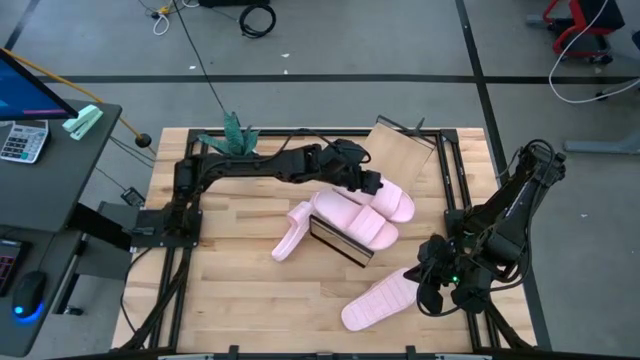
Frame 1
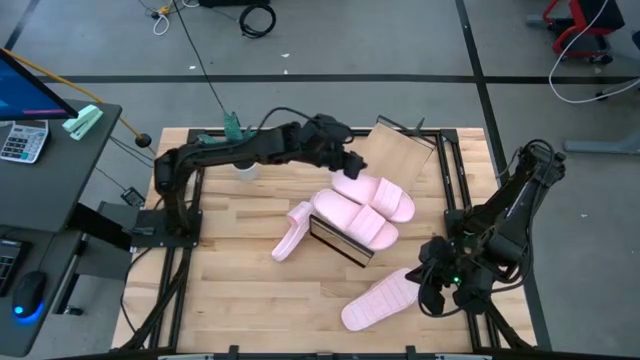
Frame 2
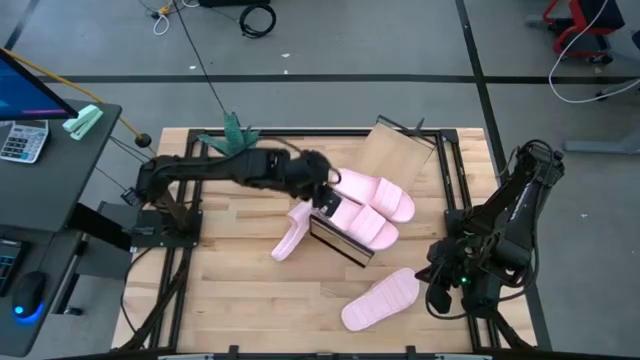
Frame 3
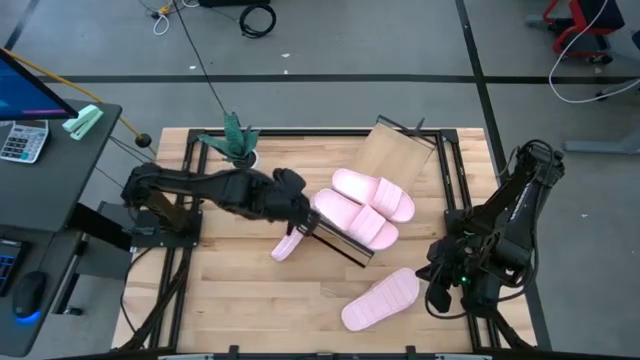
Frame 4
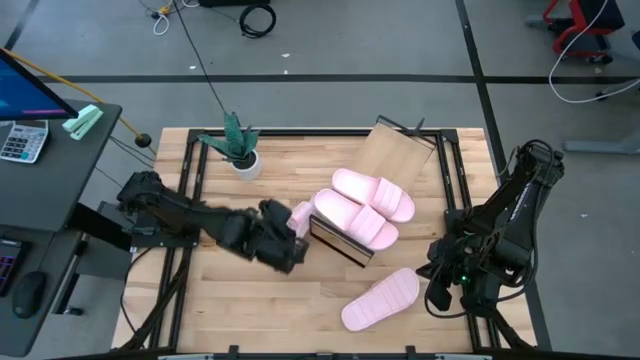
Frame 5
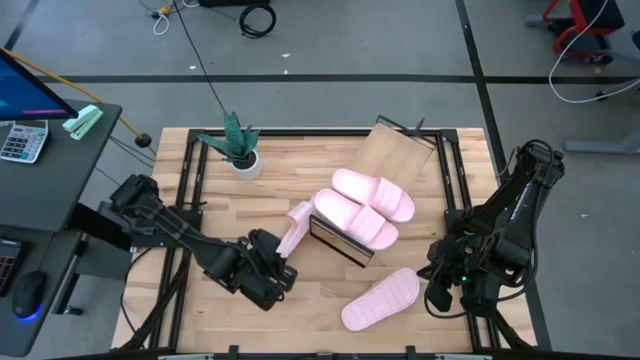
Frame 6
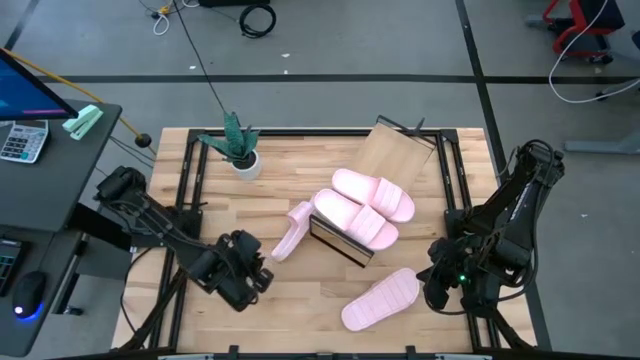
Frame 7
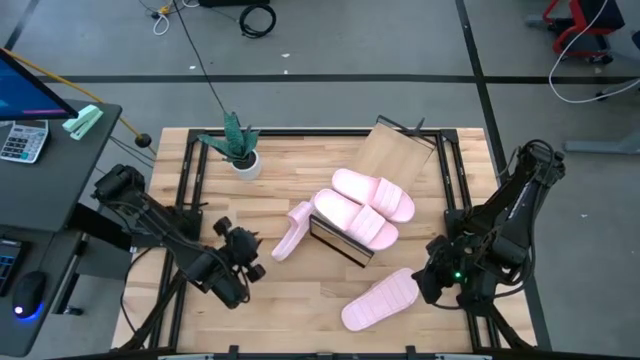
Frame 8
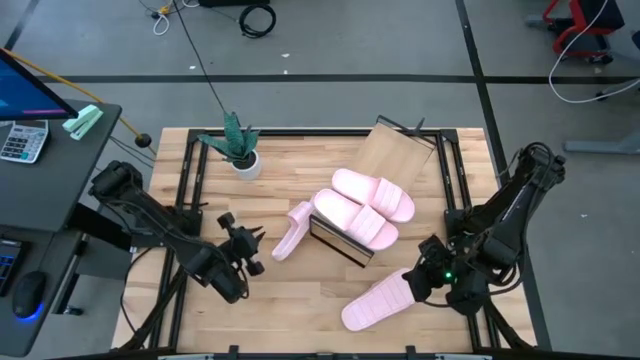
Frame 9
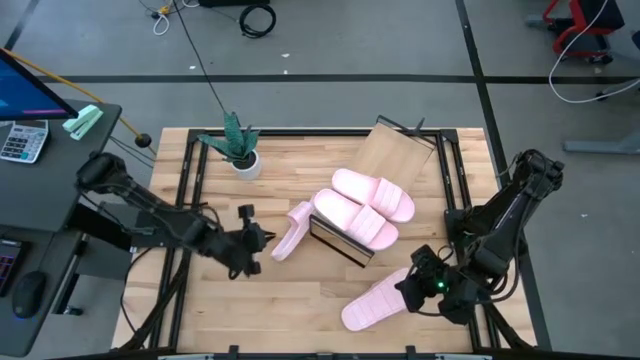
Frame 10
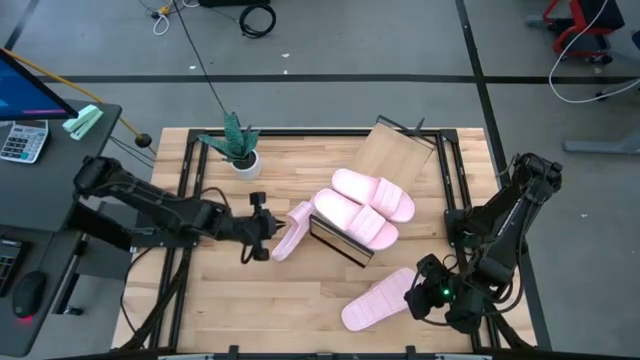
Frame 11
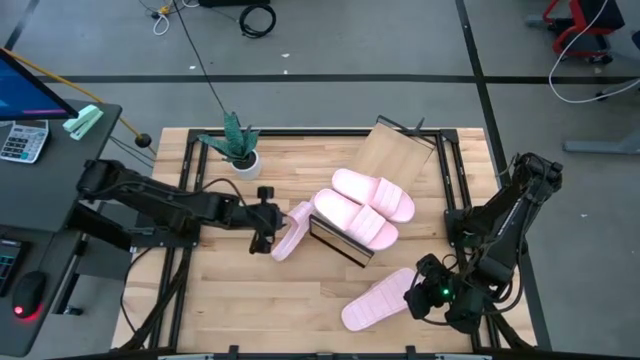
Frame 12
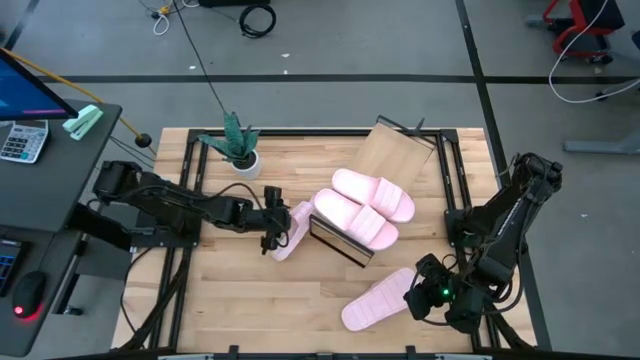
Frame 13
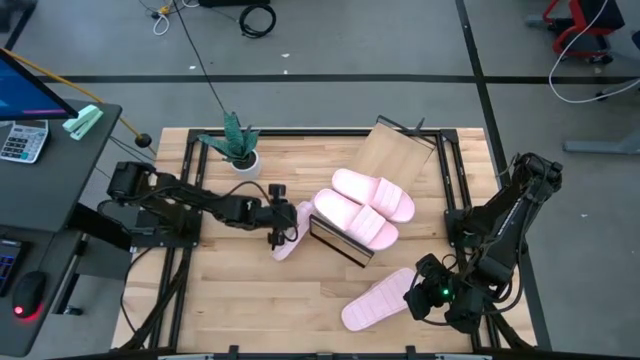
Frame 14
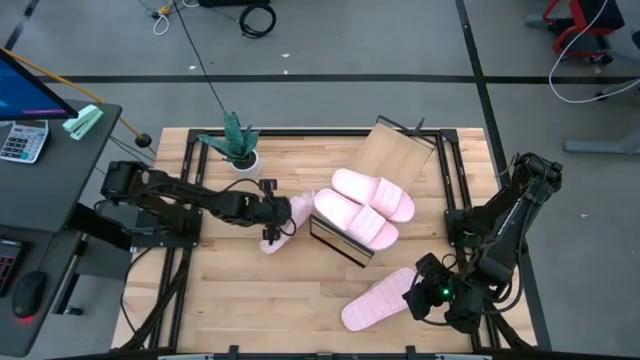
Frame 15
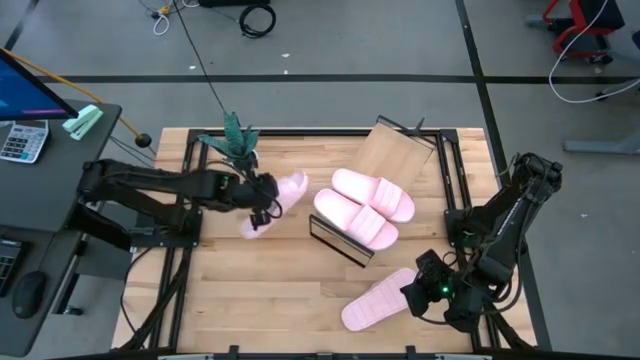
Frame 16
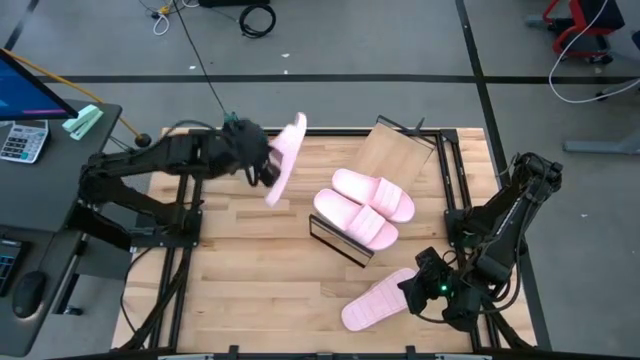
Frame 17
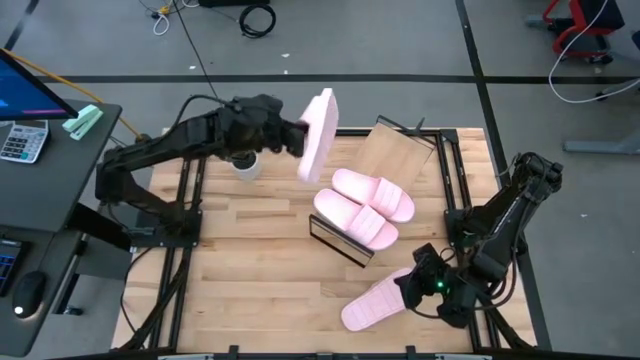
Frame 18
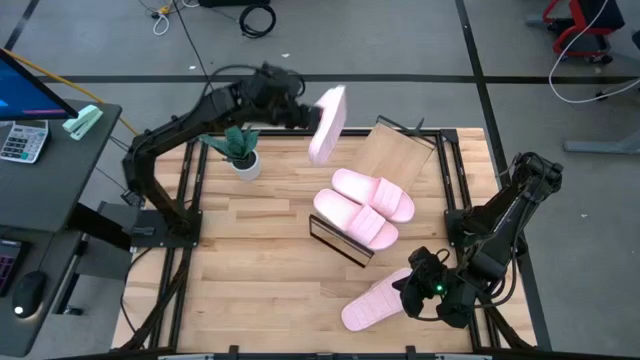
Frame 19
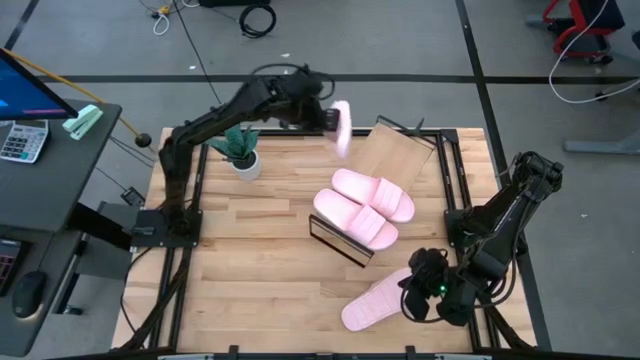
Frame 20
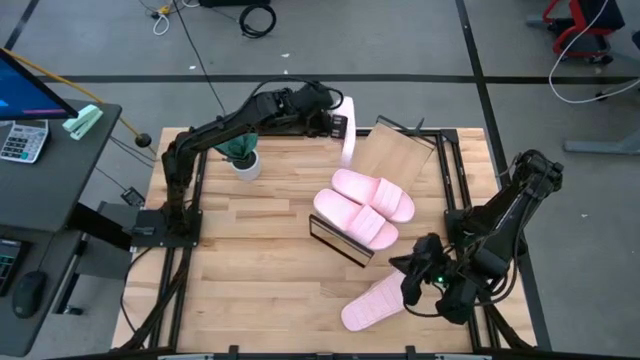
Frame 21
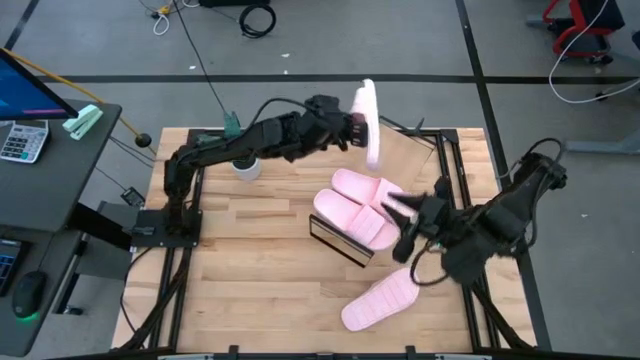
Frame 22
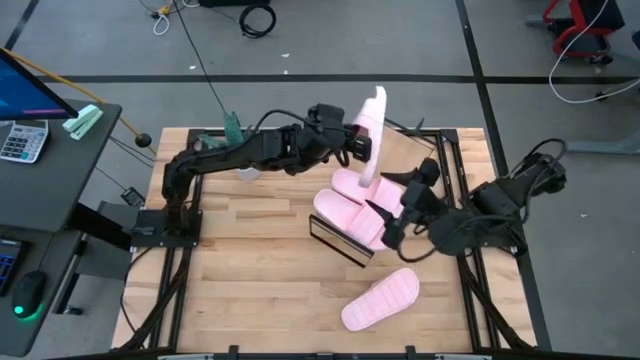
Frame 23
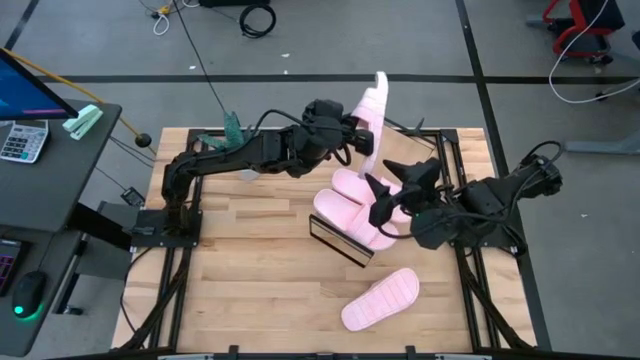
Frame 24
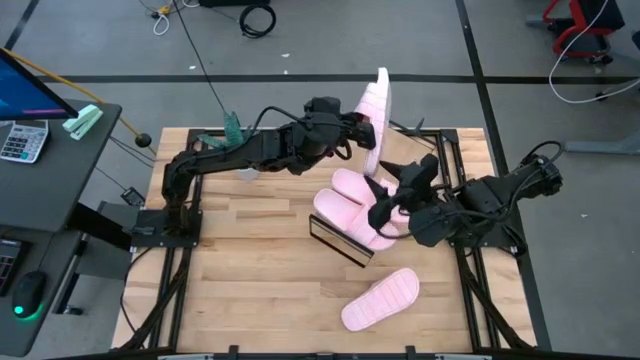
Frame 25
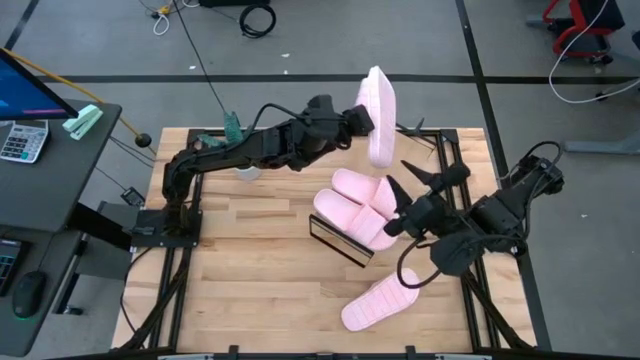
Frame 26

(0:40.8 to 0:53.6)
Task: Pick and place slides into the shelf
Put the pink slide on the shelf

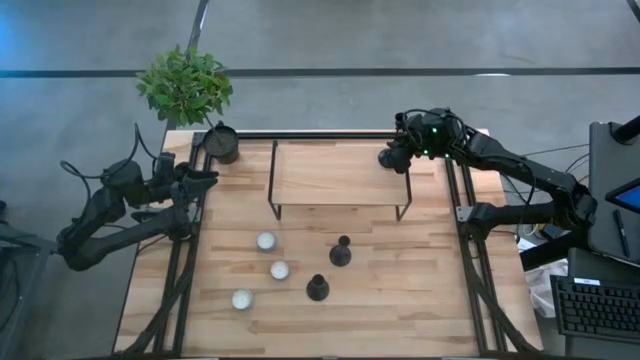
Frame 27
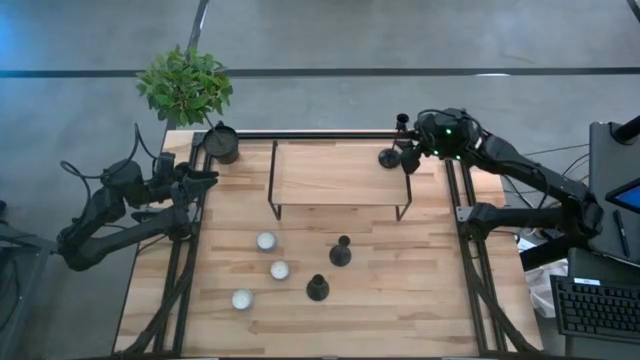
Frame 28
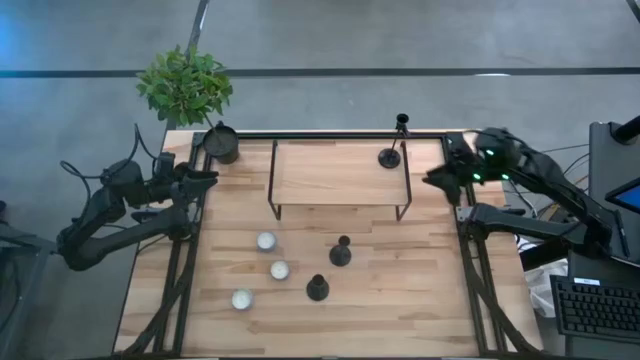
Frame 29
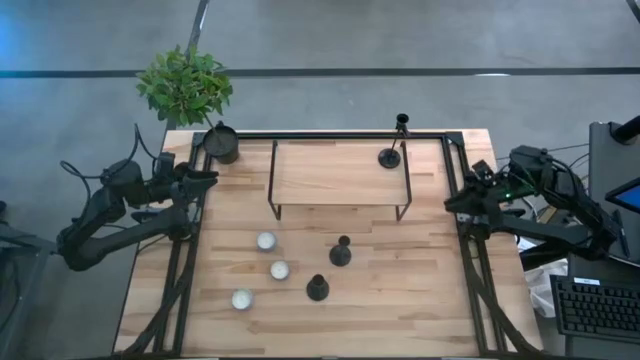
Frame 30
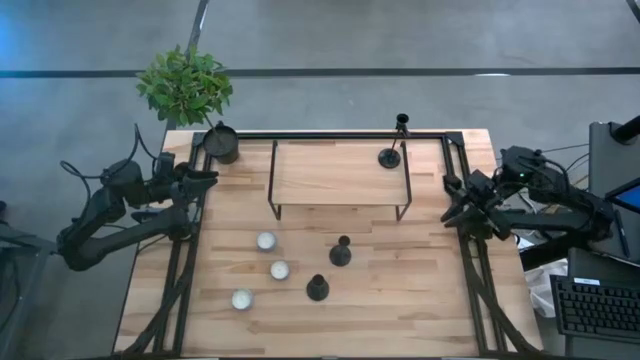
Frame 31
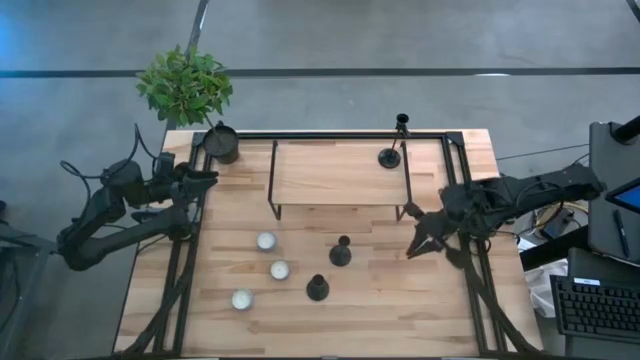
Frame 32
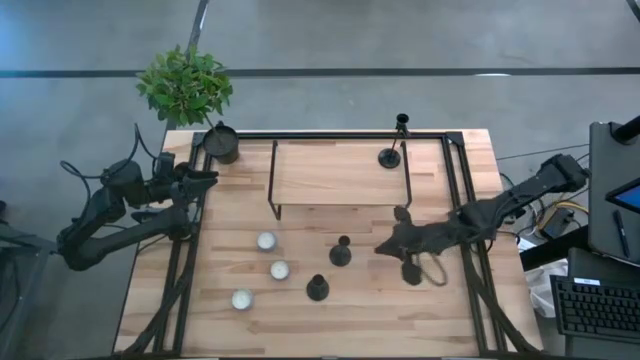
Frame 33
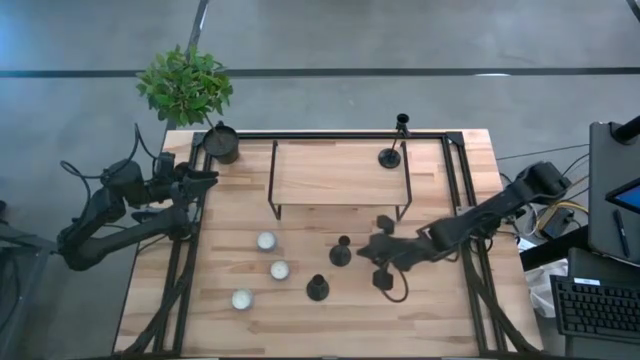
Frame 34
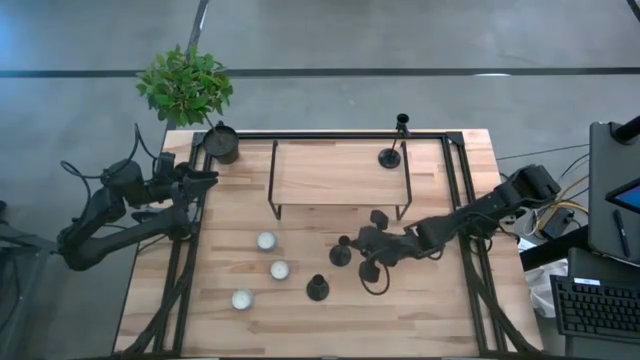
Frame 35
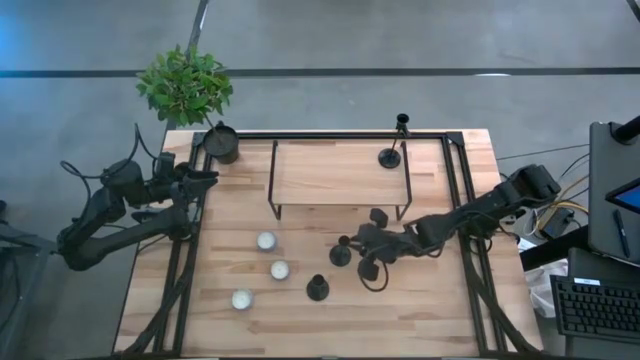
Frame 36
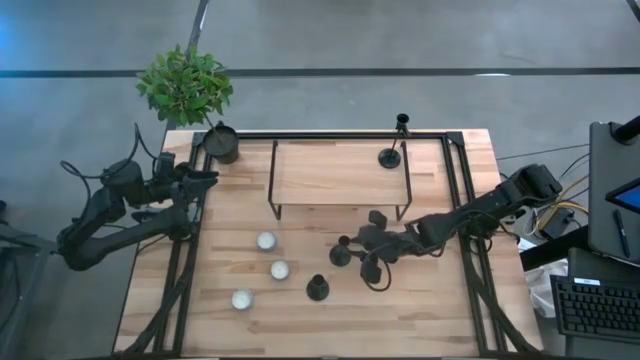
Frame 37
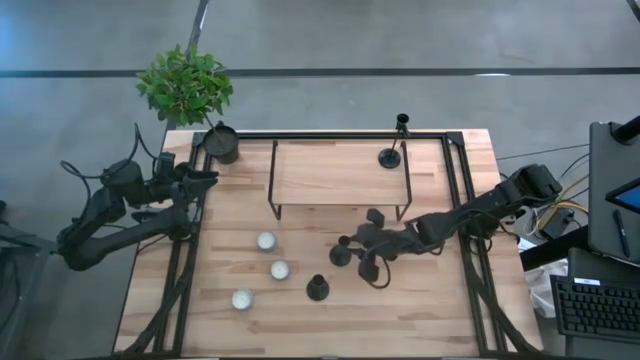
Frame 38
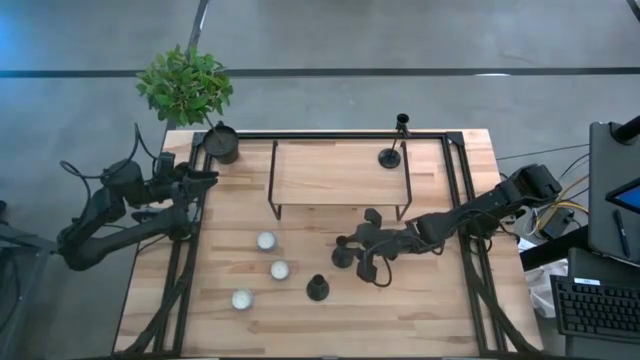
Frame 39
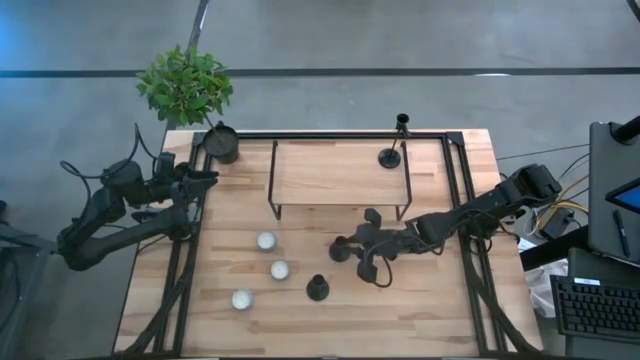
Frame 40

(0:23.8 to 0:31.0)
Task: Pick & Place candle stick holders
Put the top black candle holder on the shelf
